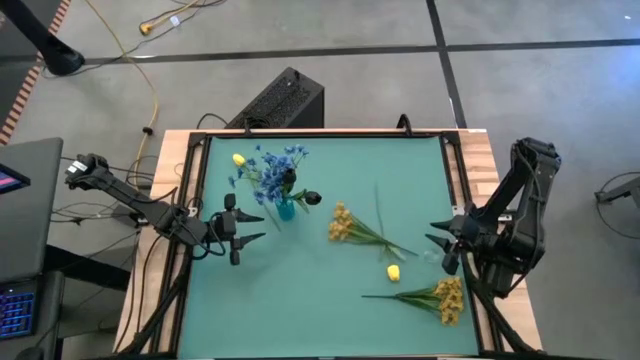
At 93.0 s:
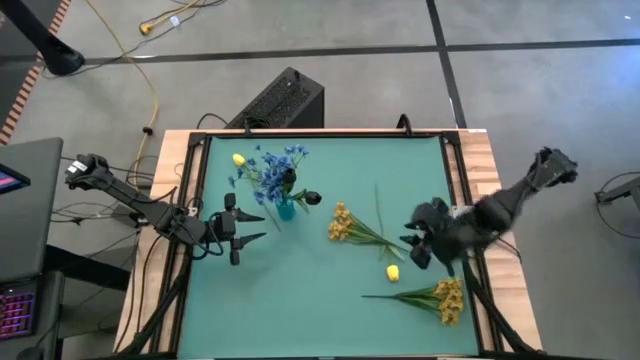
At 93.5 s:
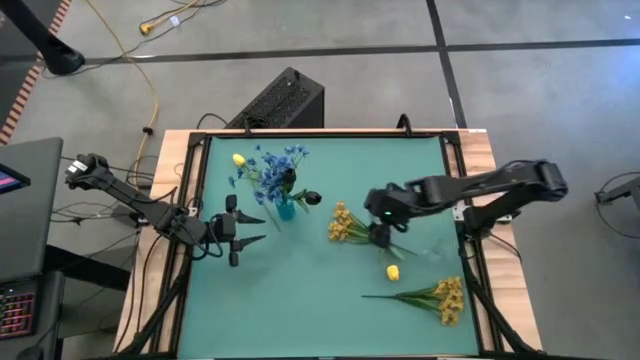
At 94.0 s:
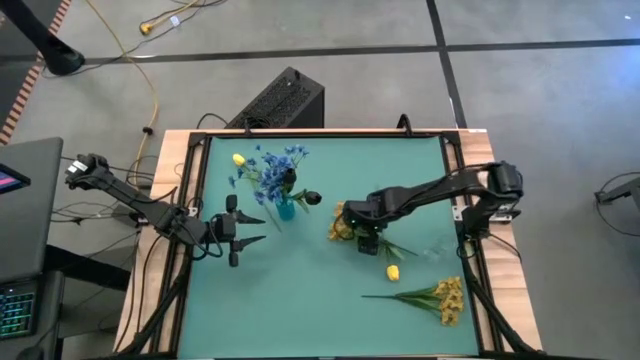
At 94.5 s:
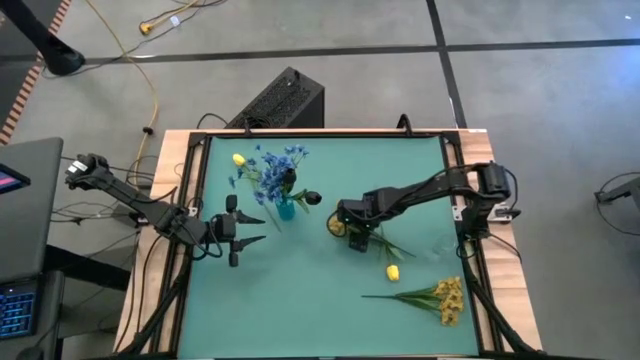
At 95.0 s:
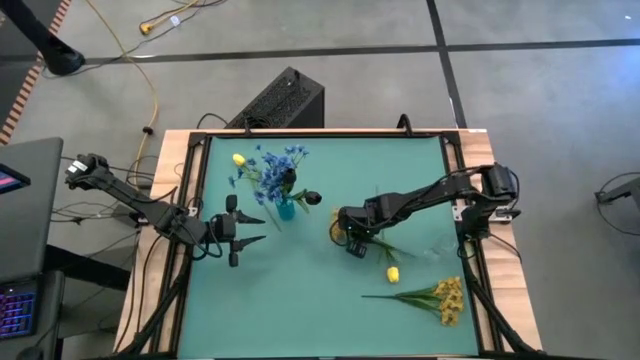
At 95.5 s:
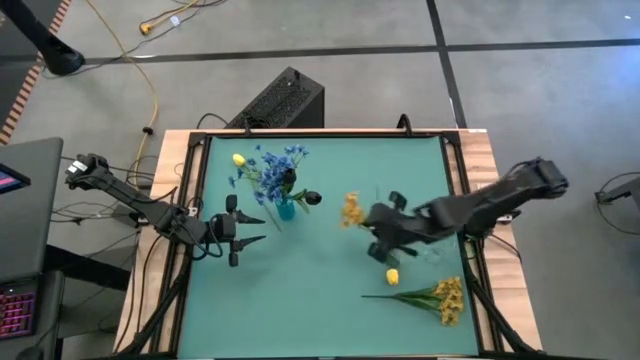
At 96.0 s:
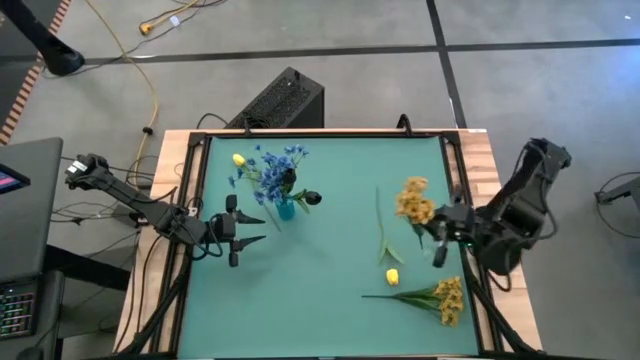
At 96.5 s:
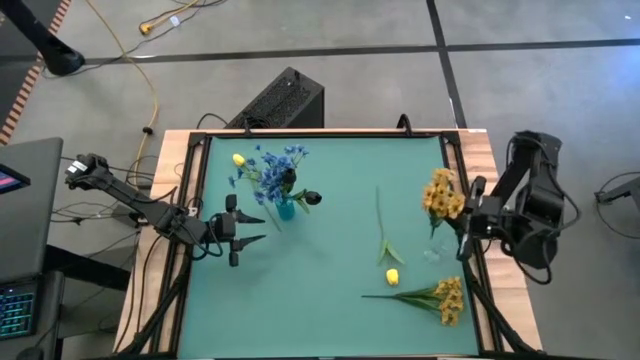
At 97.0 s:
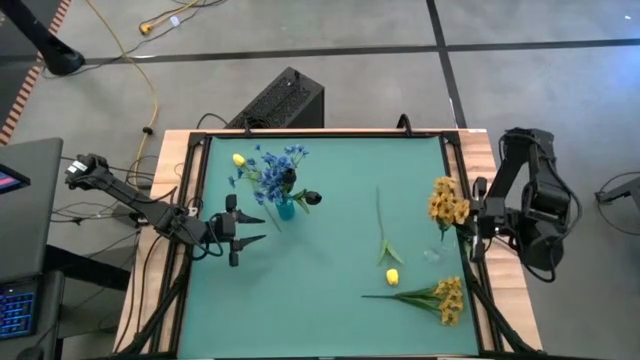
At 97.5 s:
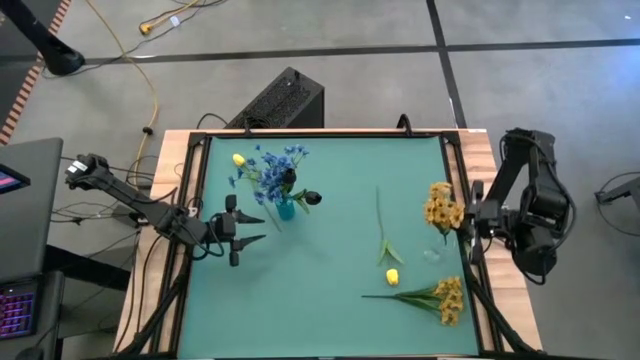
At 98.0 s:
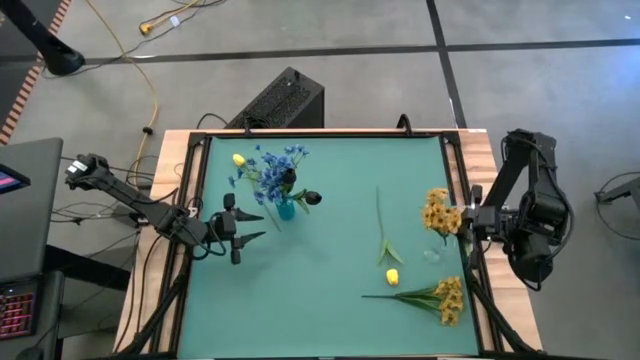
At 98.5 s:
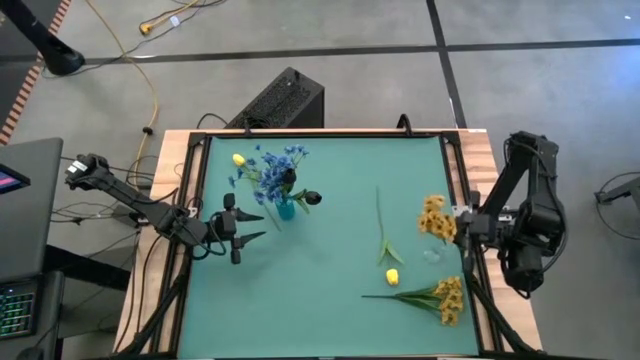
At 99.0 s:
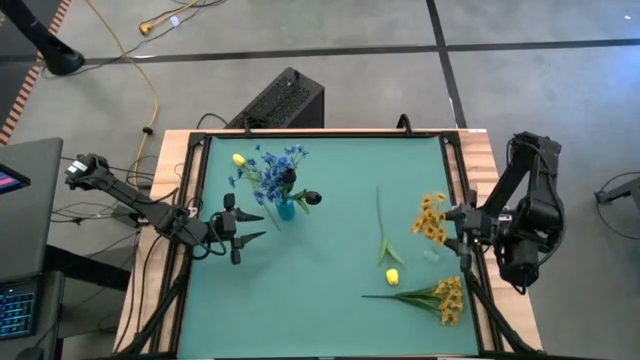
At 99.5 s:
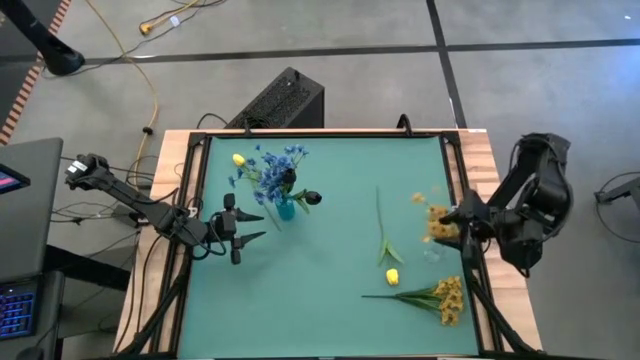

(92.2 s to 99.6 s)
Task: Sort flowers into vase by color
Put the top yellow flowers into the transparent vase

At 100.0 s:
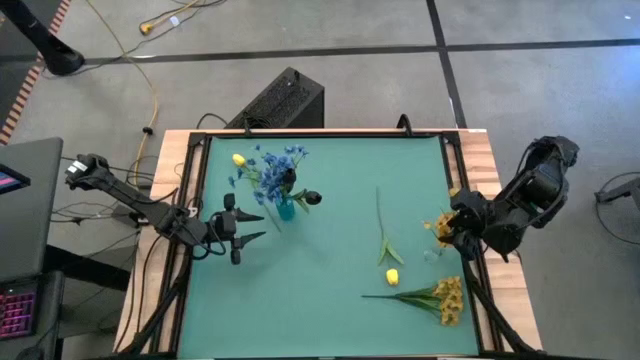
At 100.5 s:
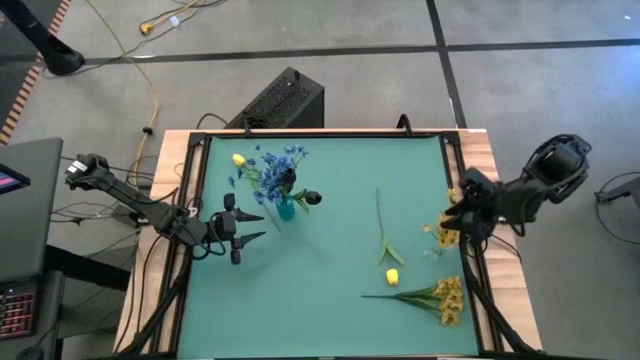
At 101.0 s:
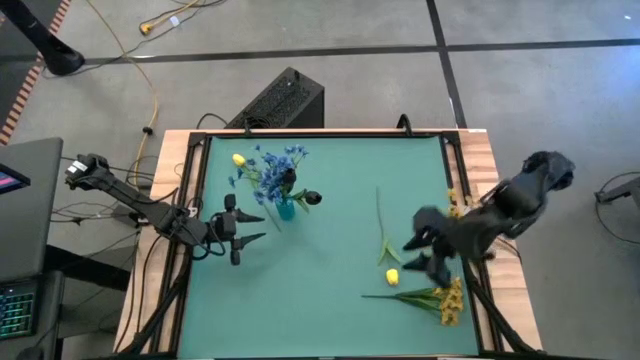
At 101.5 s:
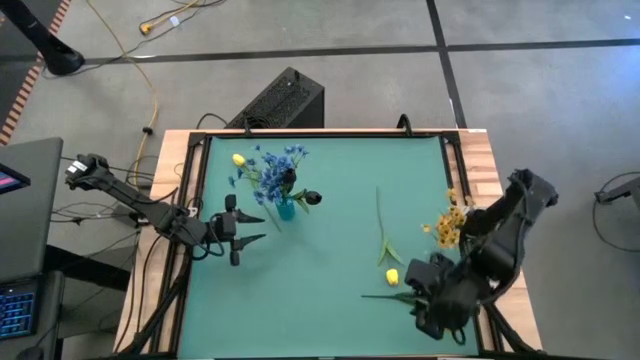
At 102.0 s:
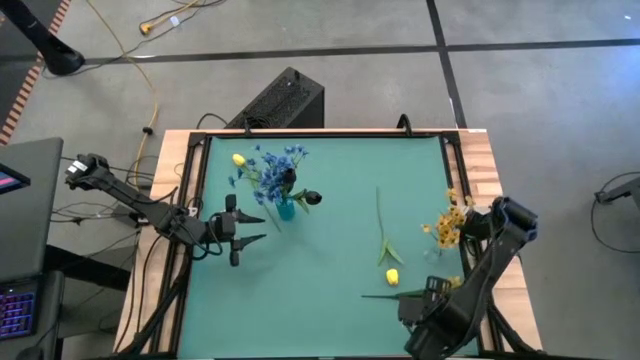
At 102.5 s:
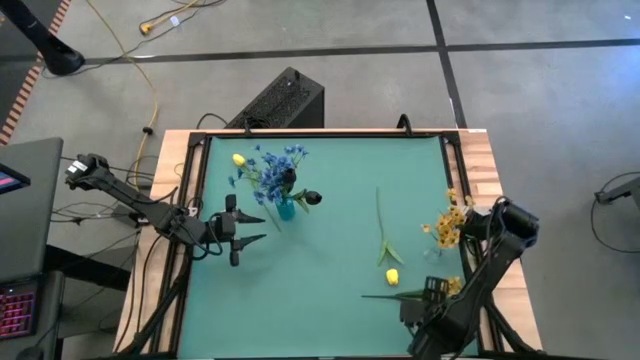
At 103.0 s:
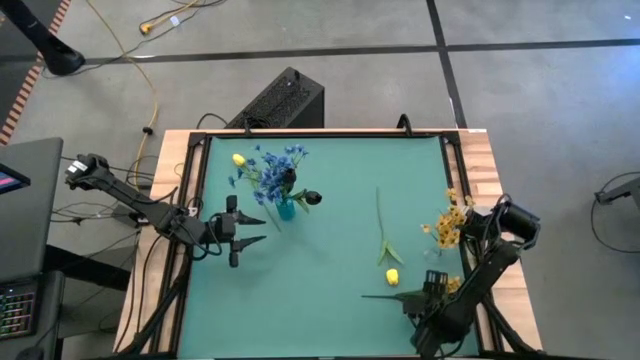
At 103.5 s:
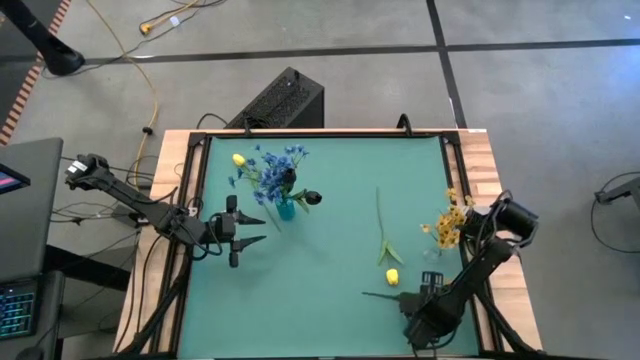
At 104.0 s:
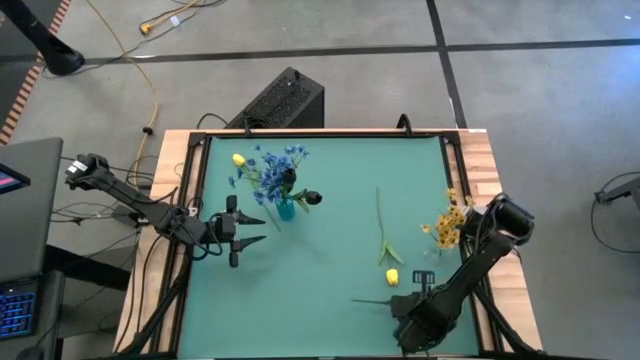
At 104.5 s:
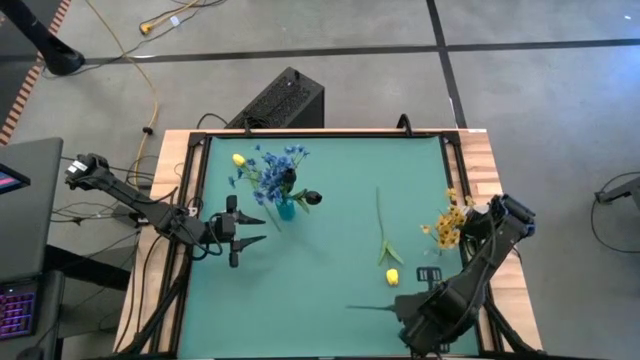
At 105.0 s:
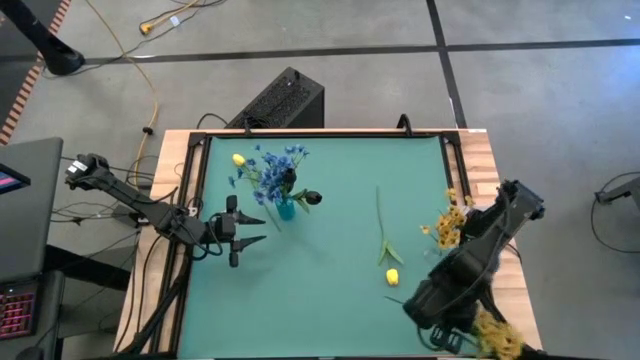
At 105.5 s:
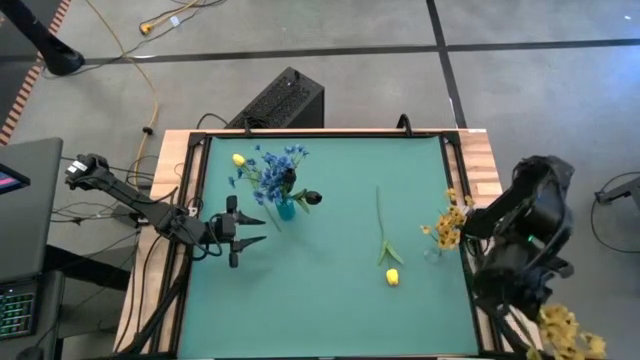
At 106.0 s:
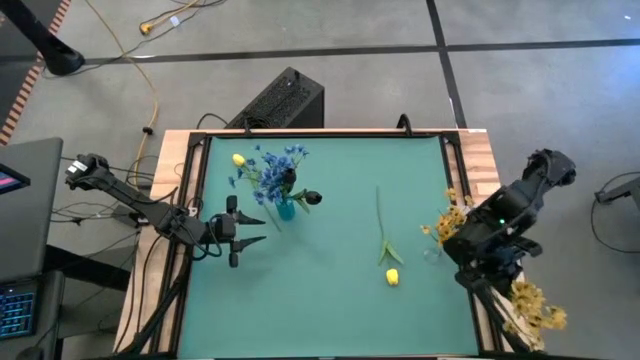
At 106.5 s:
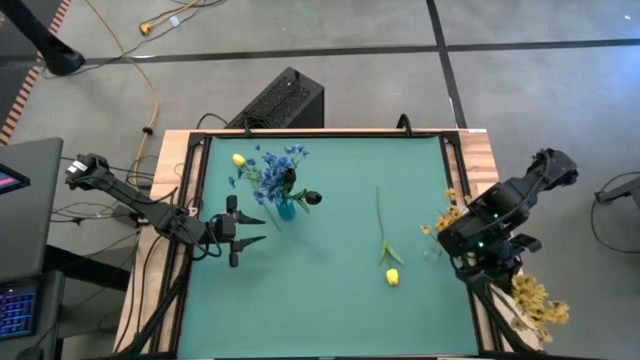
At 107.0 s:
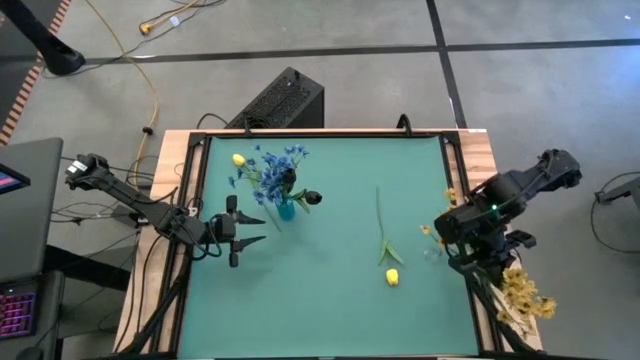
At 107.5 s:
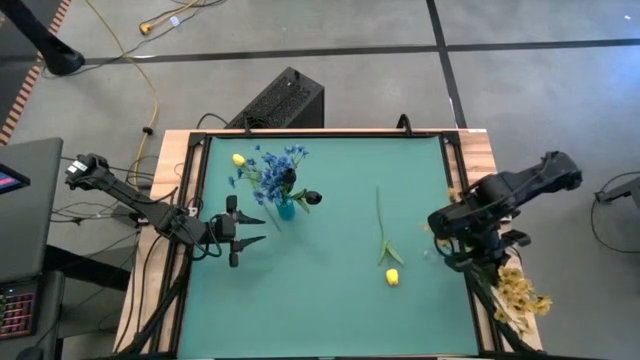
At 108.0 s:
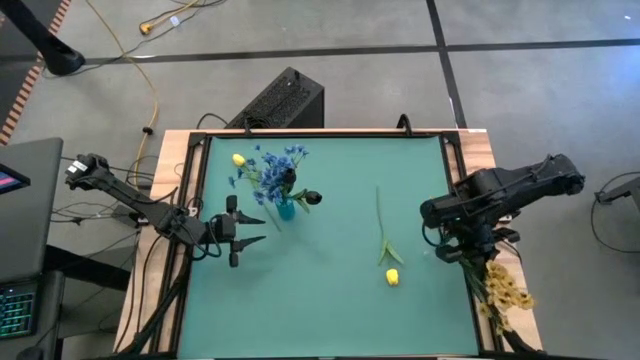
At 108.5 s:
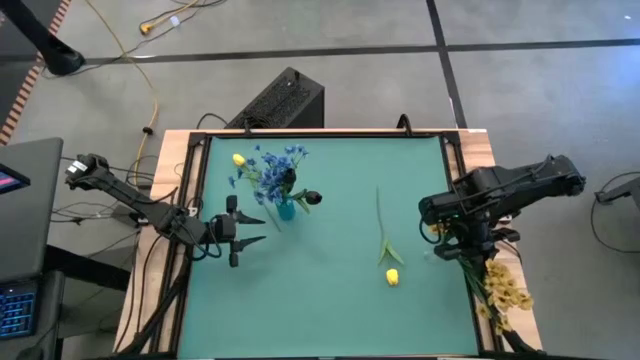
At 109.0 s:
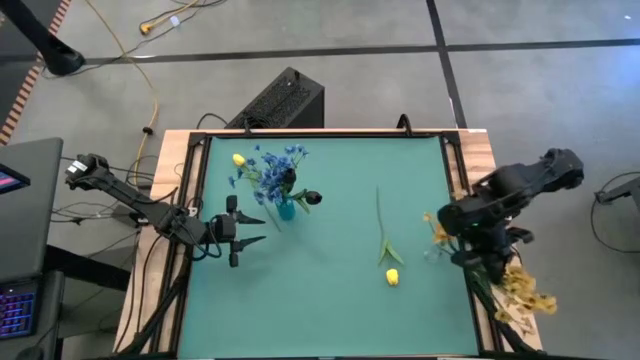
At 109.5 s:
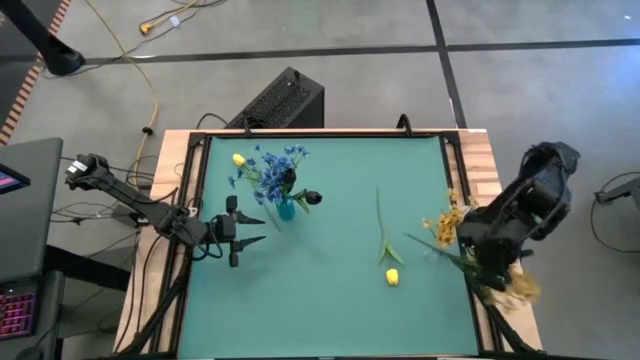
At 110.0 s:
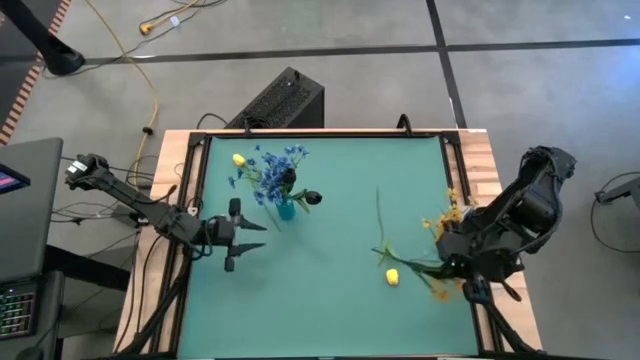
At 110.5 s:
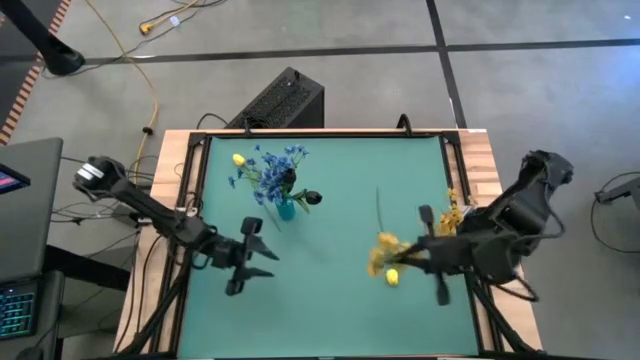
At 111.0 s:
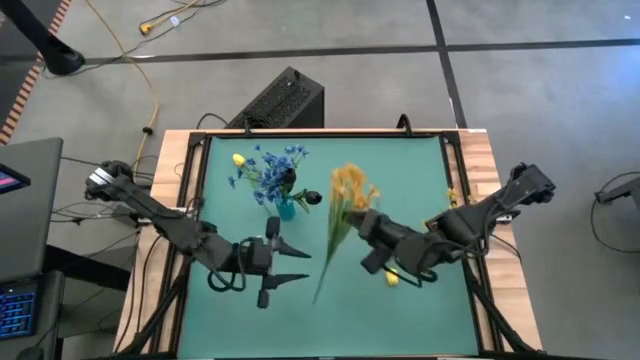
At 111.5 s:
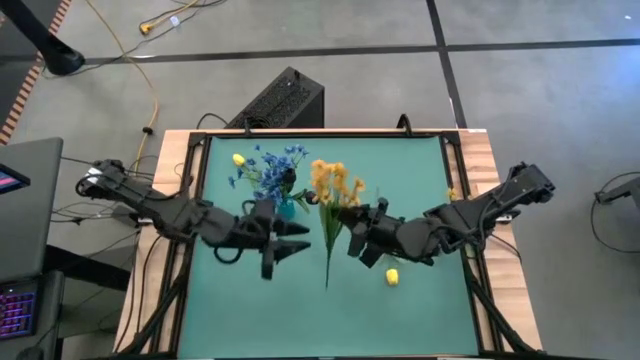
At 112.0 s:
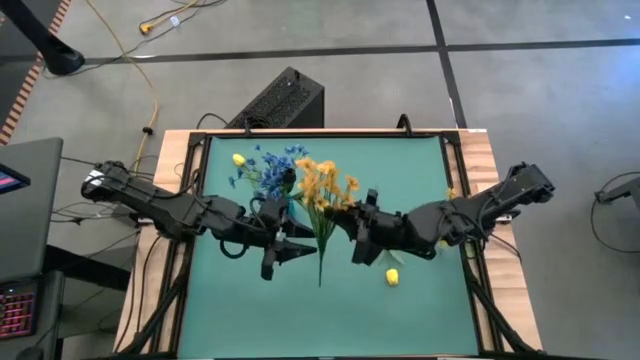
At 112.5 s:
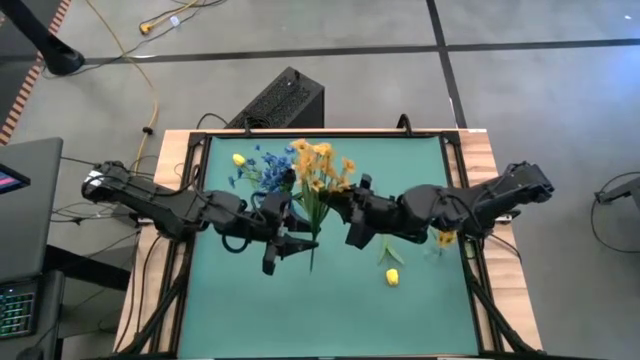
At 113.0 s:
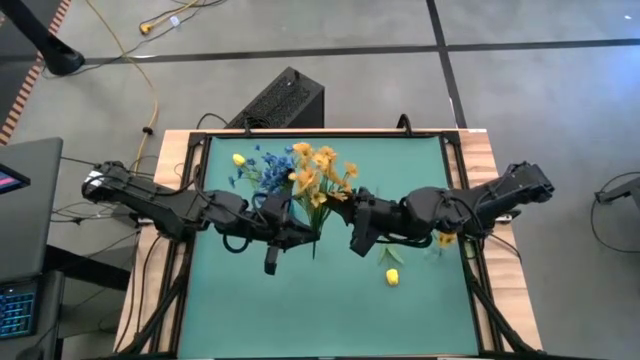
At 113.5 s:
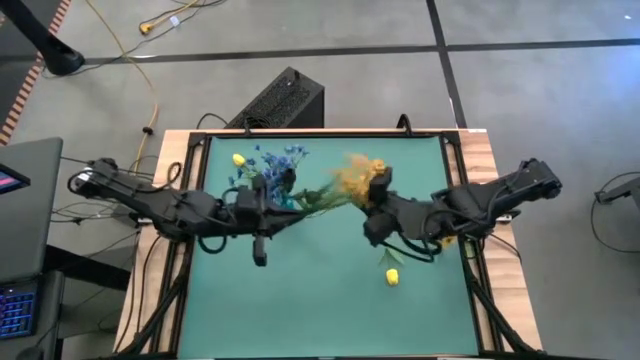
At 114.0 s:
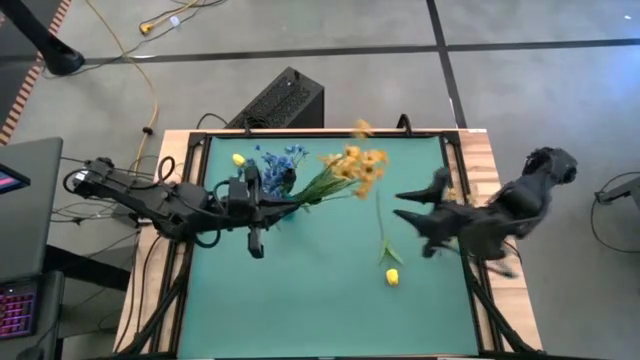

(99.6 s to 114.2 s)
Put the yellow flowers into the transparent vase
